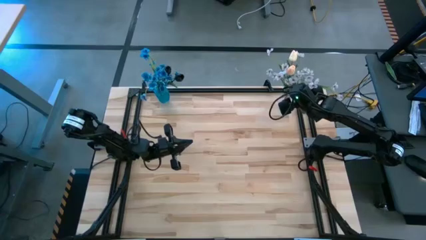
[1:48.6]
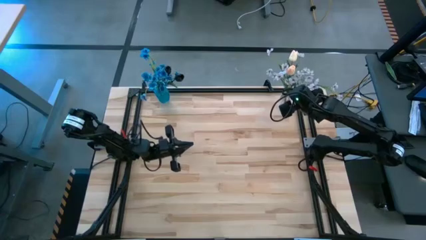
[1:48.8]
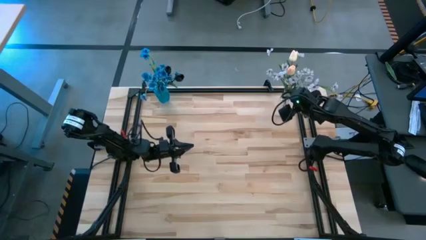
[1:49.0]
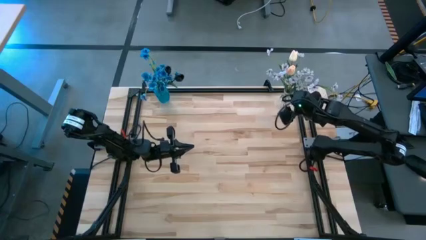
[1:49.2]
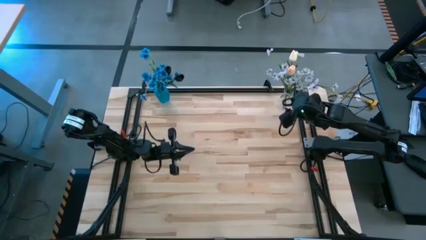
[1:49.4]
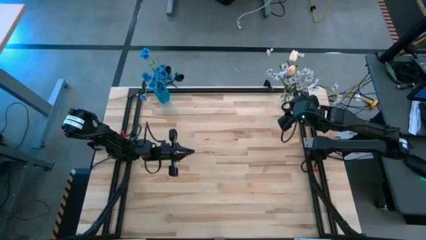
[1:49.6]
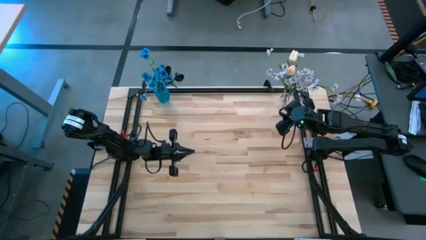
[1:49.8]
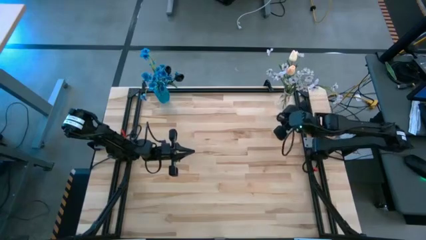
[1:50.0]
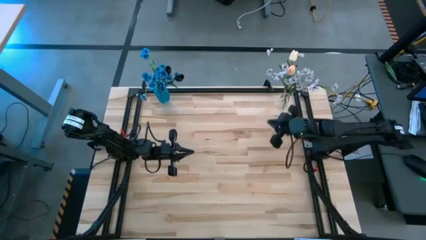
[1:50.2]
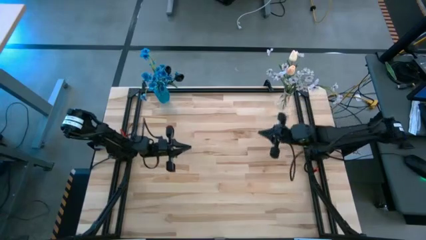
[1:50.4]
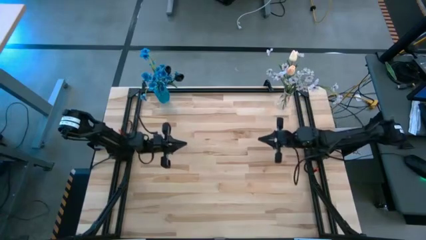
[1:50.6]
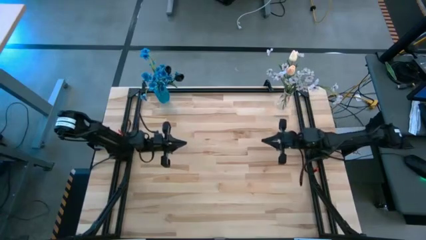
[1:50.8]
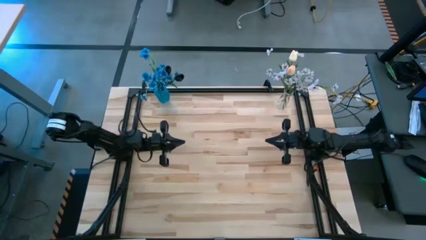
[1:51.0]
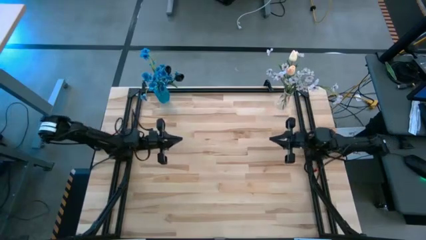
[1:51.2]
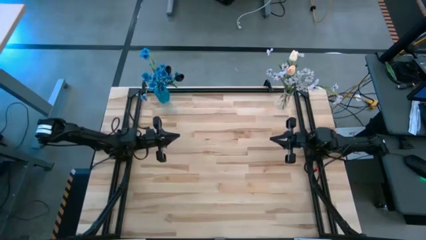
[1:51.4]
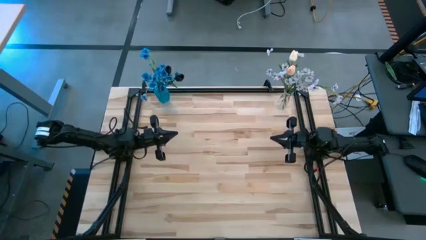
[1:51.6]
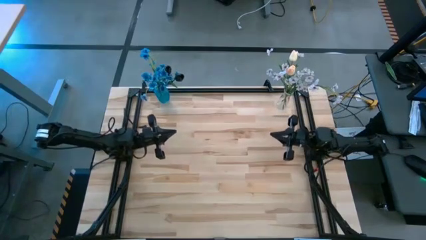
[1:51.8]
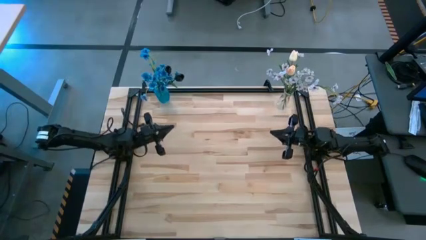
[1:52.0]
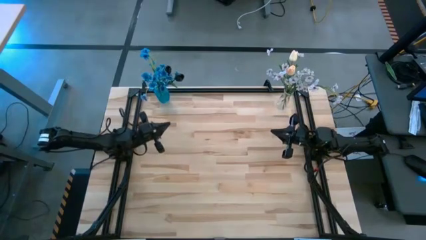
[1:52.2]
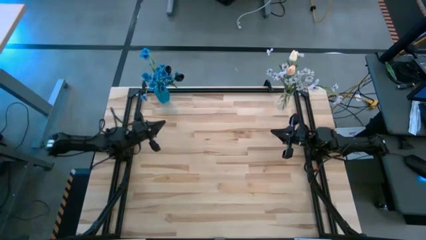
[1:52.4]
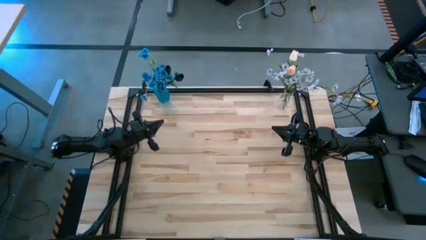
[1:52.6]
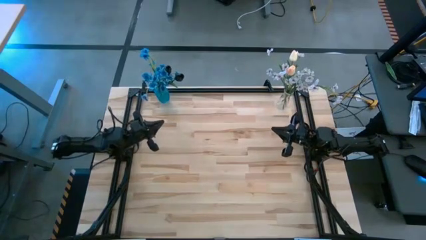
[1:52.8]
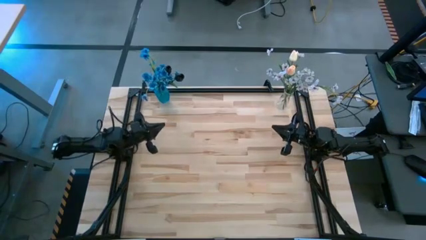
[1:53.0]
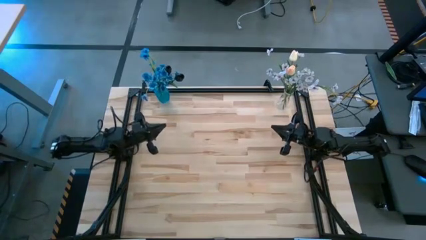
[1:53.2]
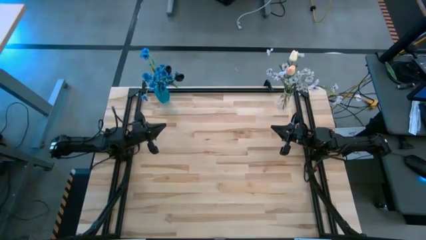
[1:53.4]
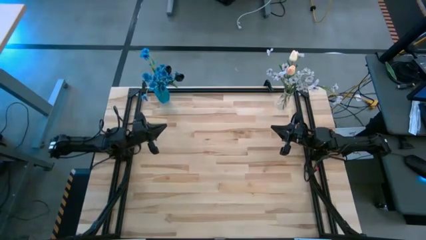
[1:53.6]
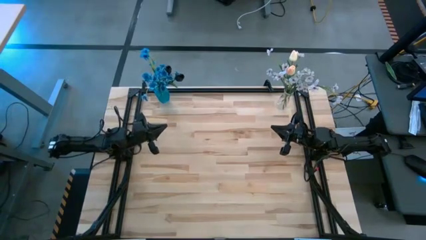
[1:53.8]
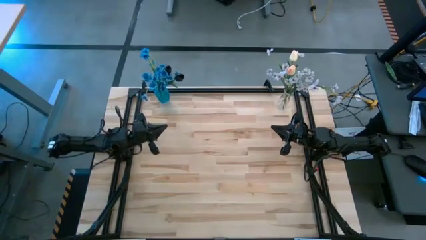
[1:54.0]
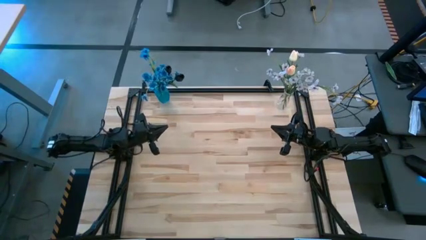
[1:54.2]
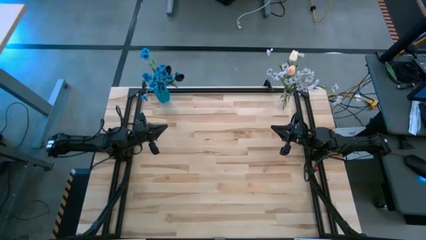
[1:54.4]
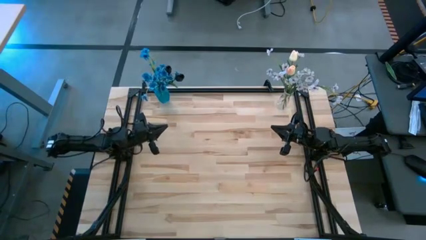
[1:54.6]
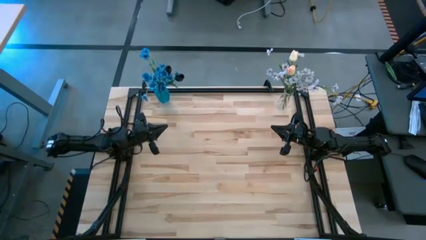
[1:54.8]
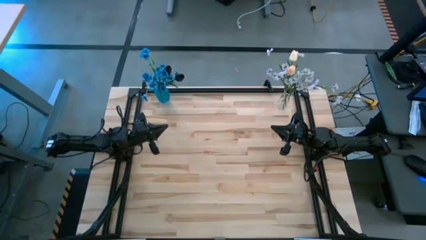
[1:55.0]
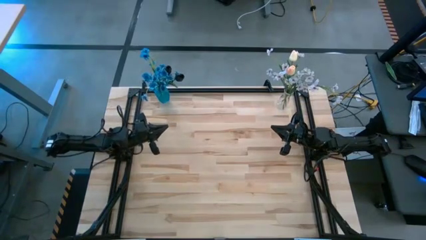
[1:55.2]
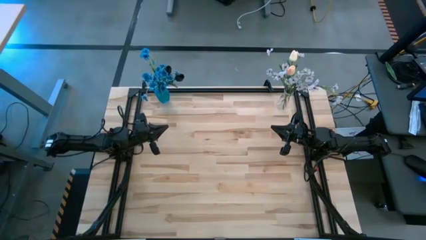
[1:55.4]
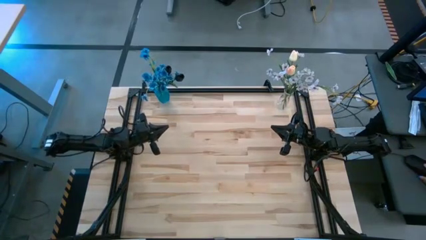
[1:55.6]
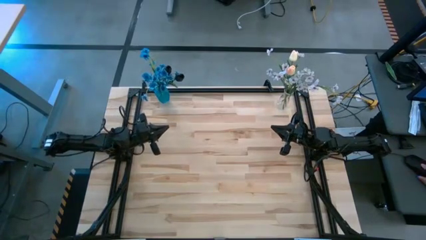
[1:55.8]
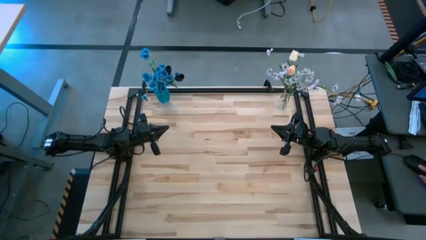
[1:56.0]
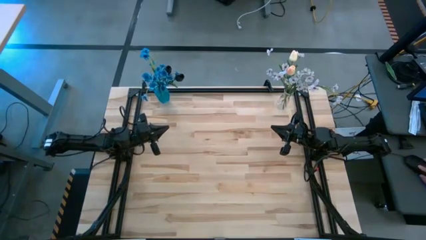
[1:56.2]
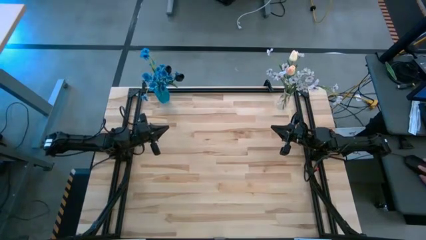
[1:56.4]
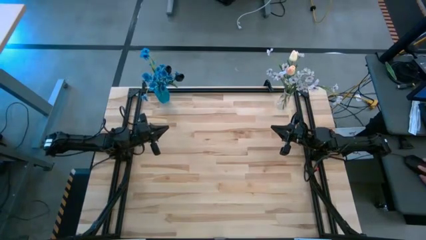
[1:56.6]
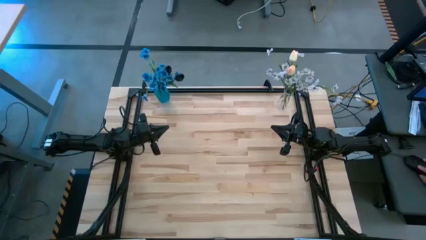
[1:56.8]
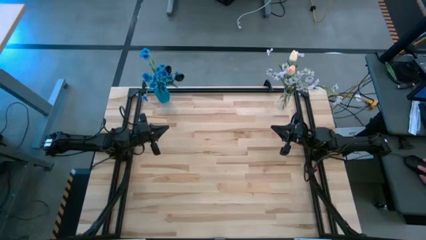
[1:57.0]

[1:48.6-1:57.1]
Task: Sort flowers into vase by color
Return to Home Position
